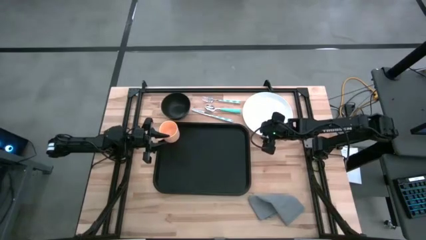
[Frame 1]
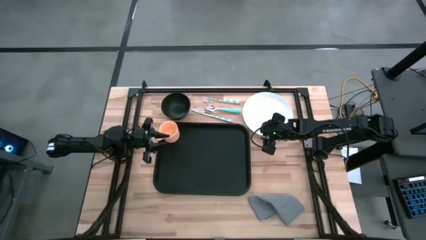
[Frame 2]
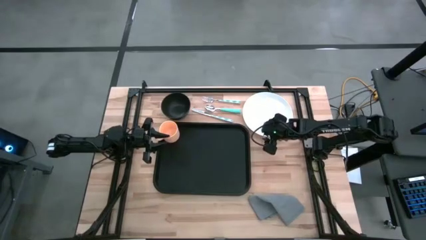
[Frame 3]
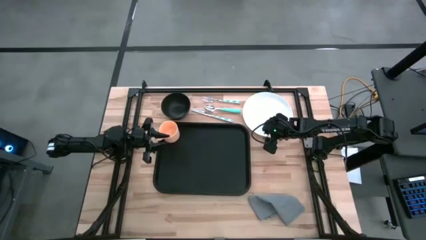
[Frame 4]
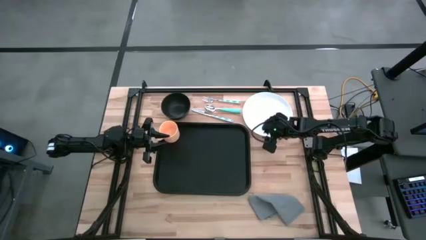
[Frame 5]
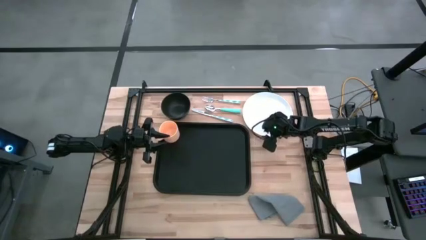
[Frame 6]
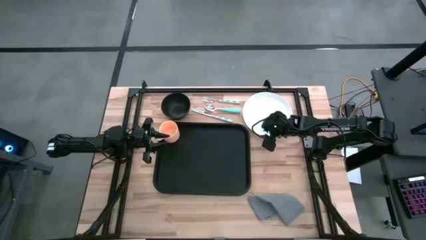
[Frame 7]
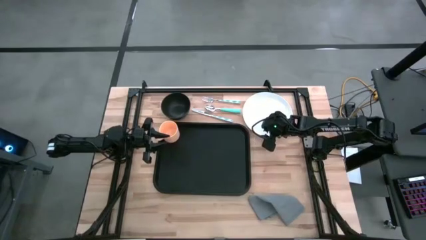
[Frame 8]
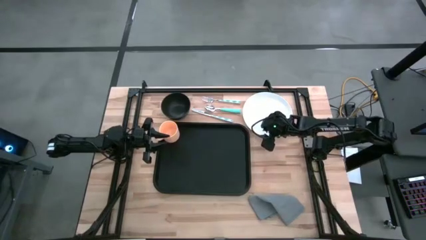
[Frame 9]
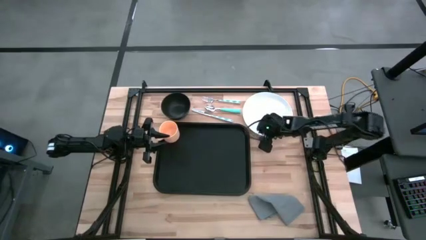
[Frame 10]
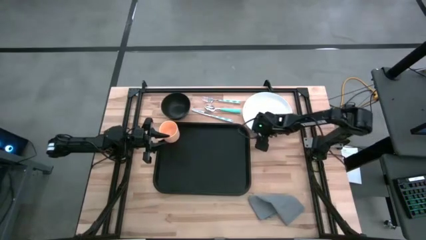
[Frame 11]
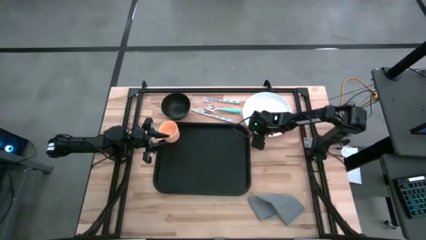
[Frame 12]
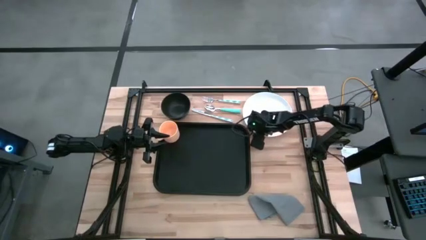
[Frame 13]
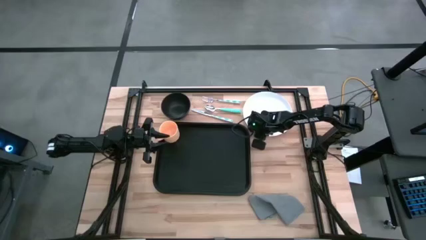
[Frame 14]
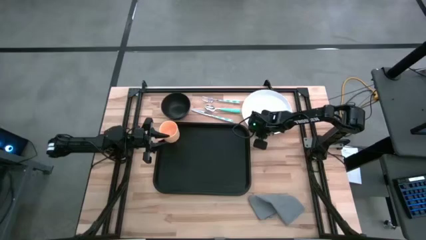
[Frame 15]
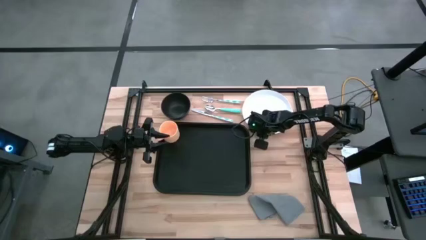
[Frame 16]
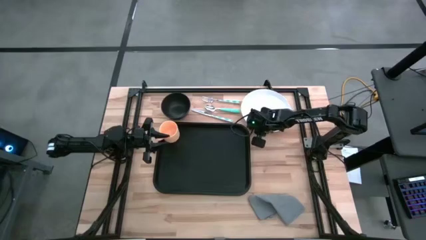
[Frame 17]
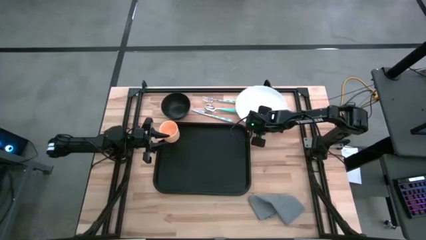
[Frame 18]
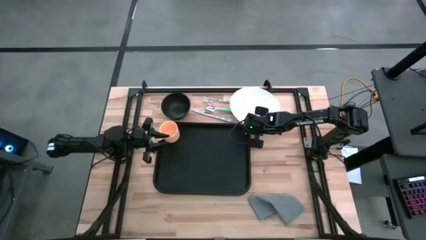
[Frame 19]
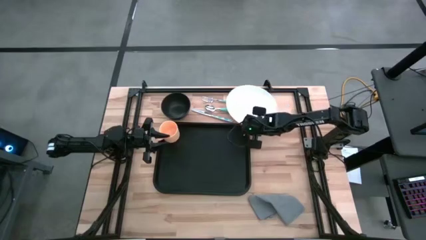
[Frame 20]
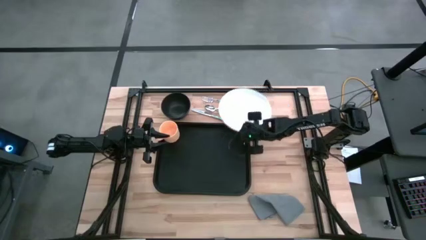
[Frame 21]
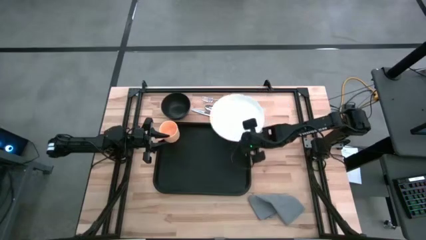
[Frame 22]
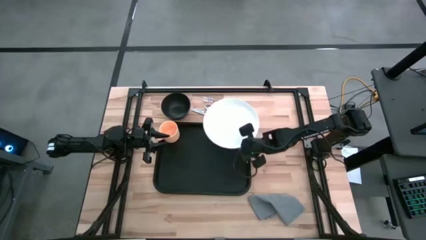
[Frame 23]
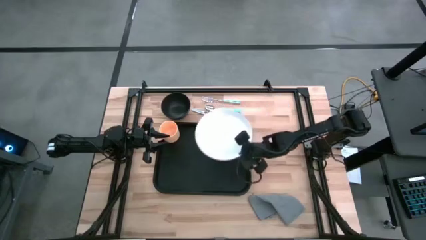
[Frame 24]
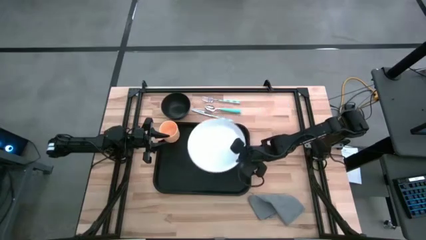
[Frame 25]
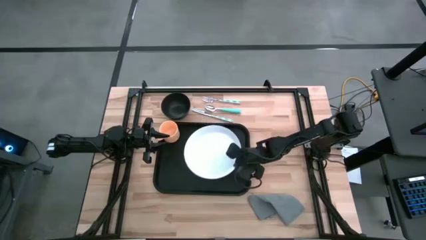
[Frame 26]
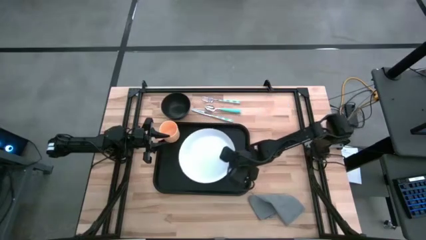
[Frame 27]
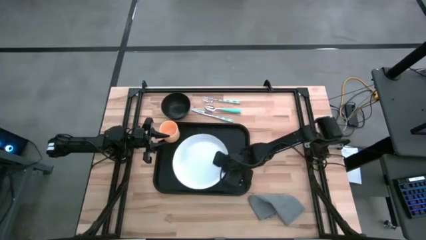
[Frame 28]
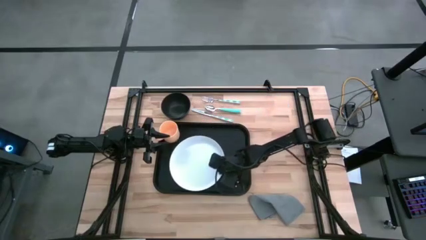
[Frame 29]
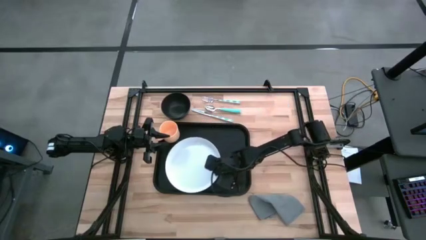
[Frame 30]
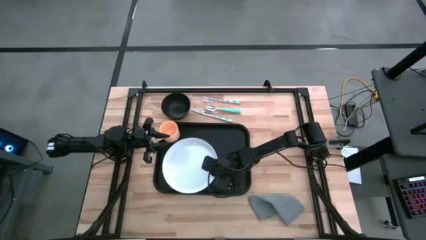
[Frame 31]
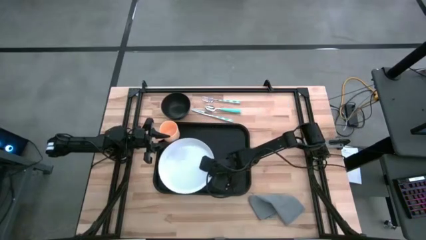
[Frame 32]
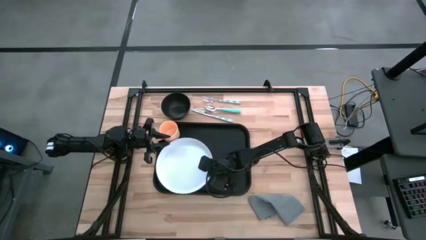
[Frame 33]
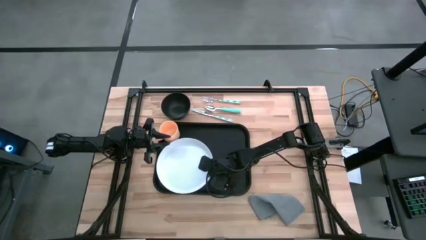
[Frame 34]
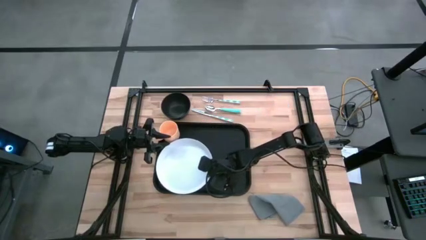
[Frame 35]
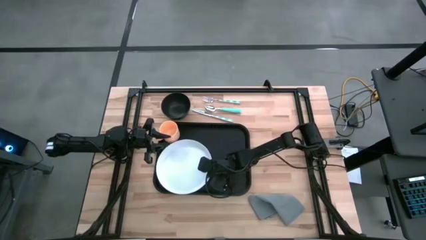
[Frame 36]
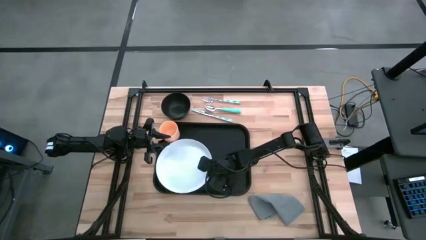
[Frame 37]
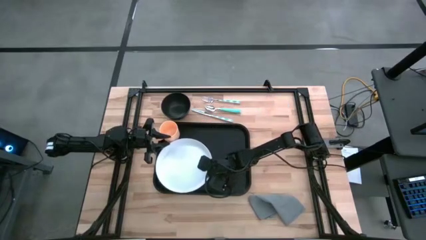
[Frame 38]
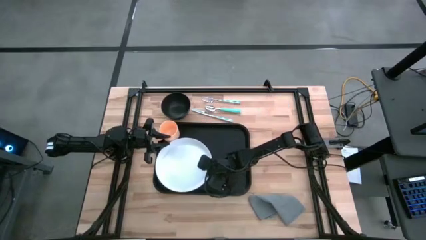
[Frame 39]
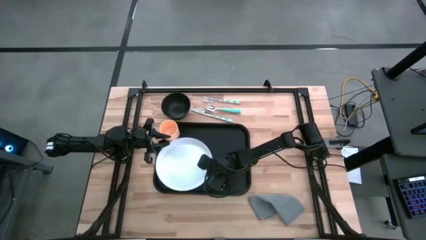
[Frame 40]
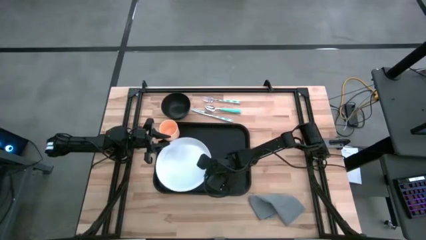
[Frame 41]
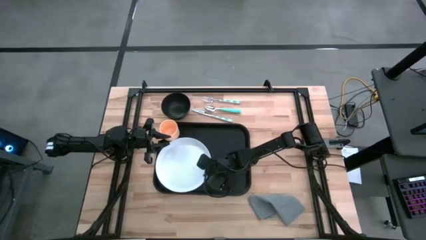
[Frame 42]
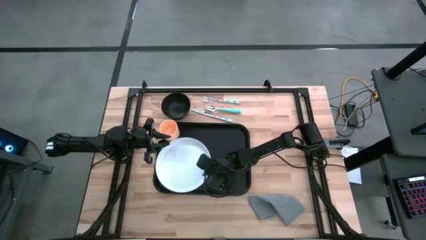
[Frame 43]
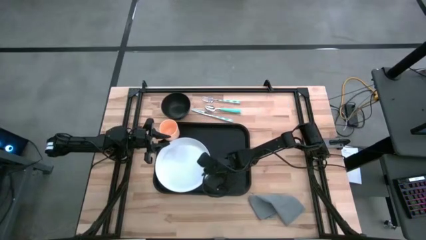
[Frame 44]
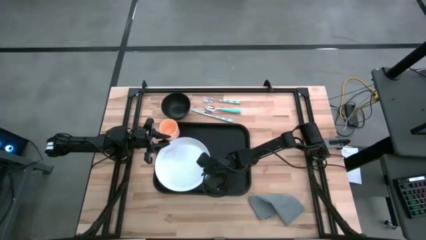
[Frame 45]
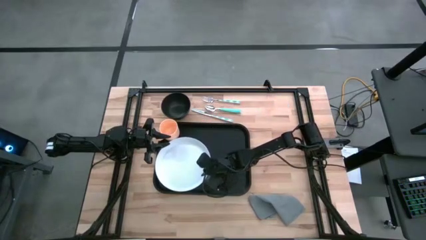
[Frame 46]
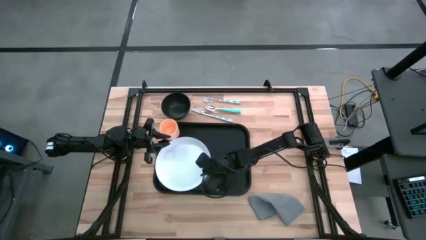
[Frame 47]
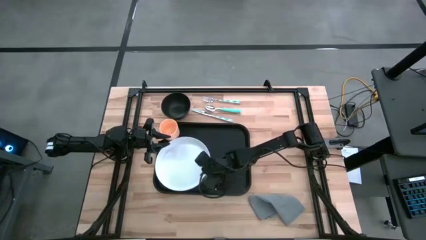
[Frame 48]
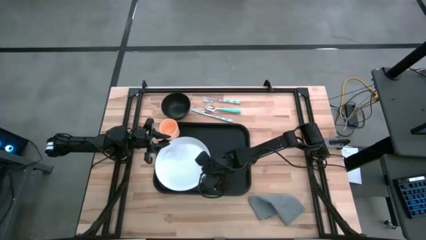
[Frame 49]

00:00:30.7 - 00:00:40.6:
Task: Set up tray
Put the white plate to the bottom right of the orange mug on the black serving tray
